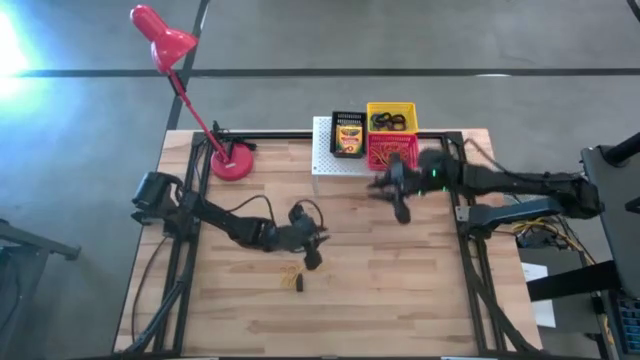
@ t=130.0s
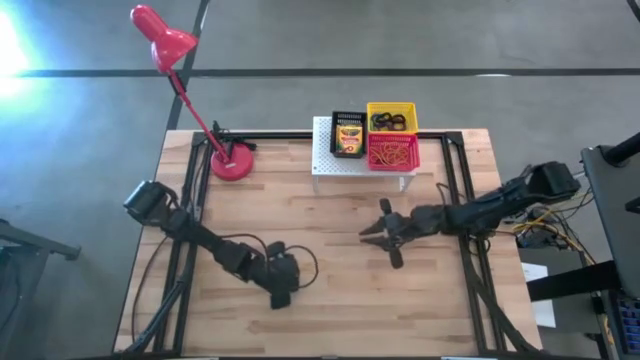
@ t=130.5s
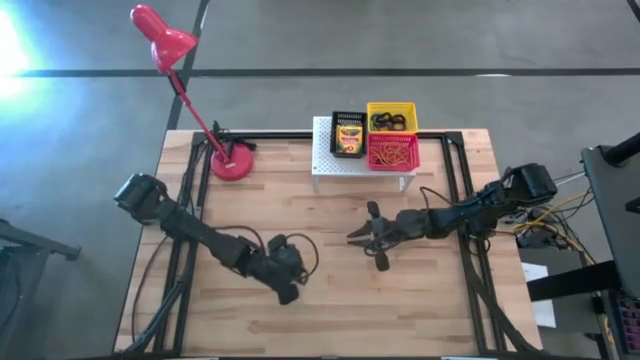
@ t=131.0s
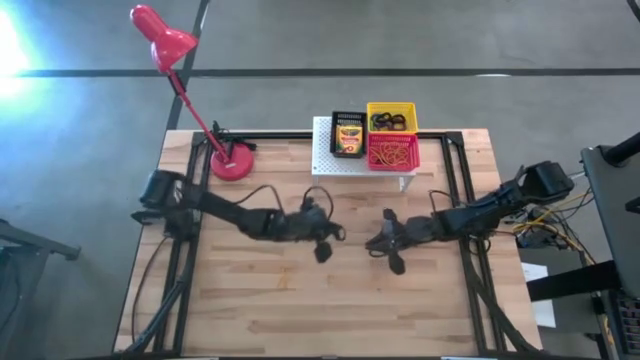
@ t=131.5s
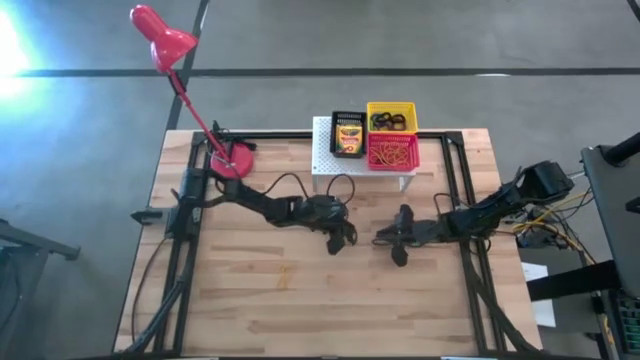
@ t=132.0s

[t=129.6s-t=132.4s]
Task: Pick & Place Office Desk Supplies
Put the black rubber band into the red basket on the shelf

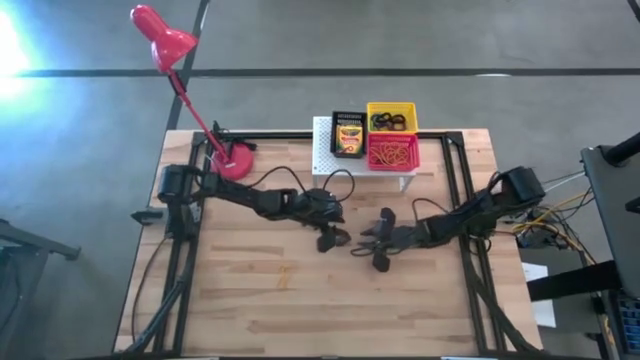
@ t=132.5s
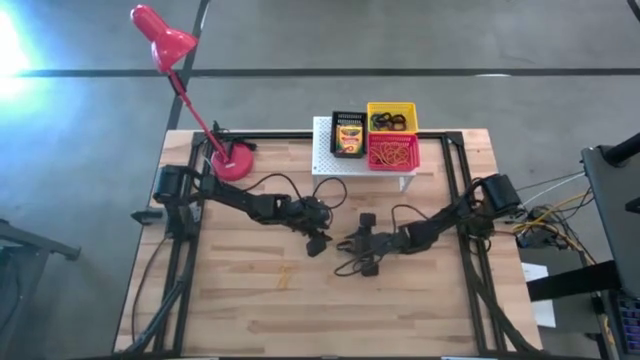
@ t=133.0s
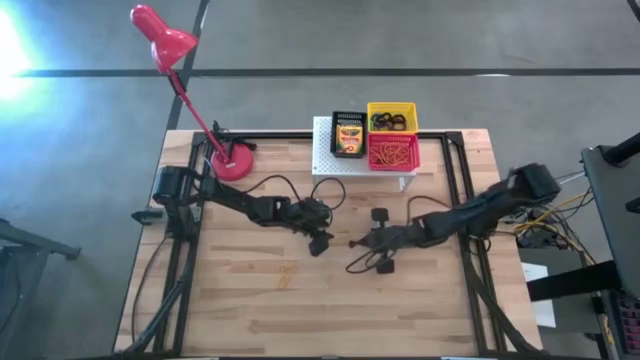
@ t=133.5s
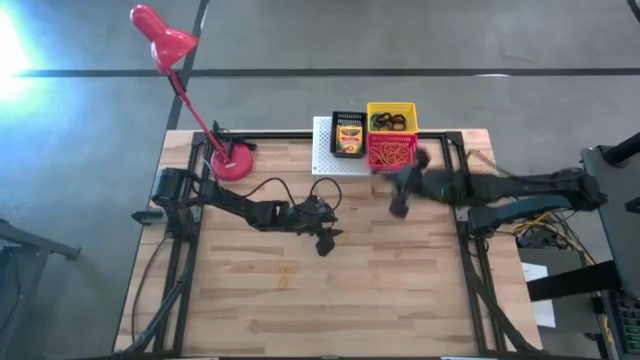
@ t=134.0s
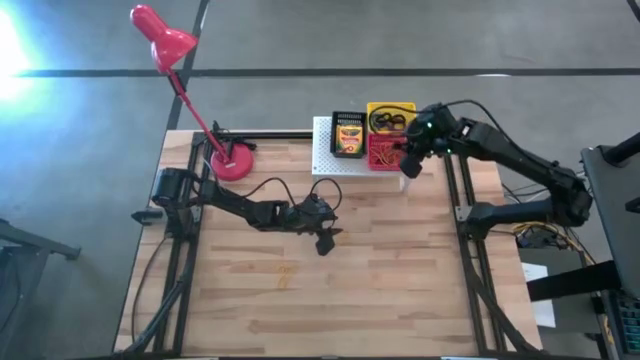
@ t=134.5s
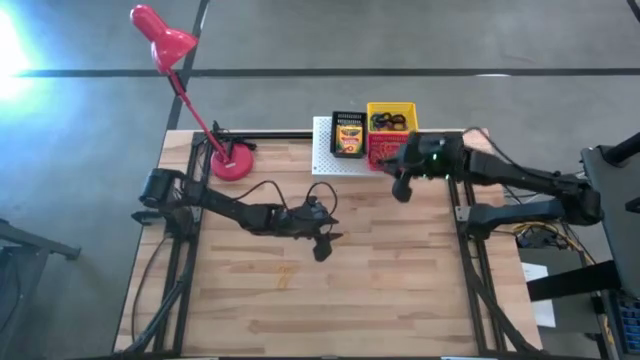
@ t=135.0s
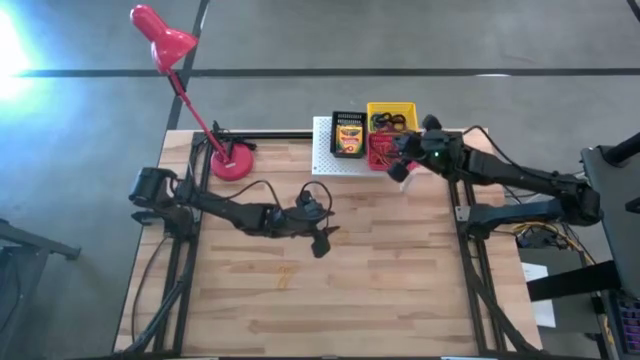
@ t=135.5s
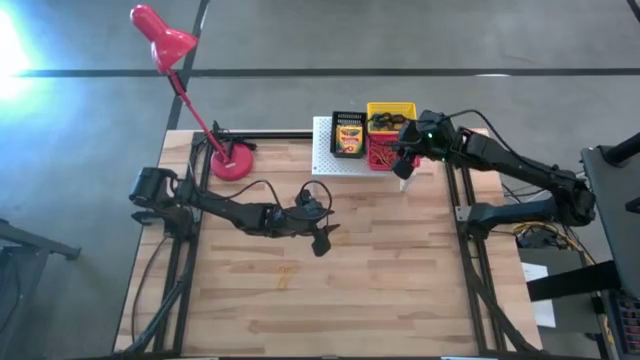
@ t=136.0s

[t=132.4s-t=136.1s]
Put the black rubber band into the red basket on the shelf

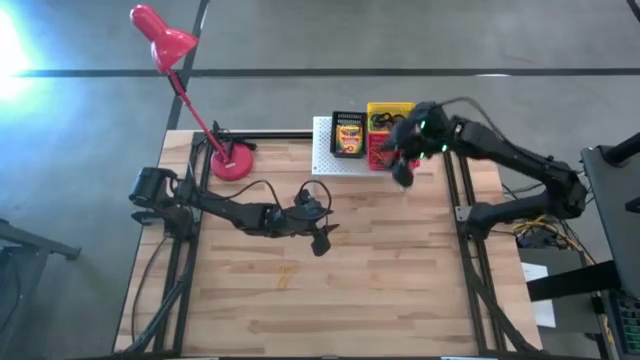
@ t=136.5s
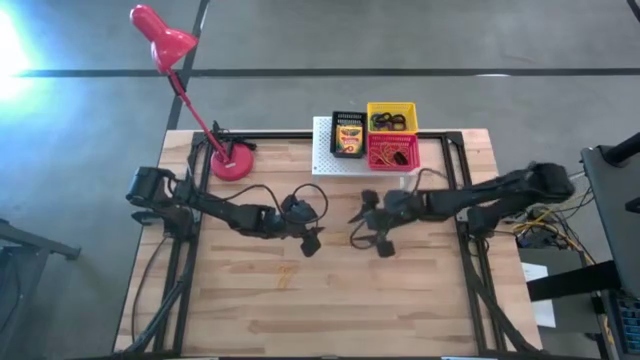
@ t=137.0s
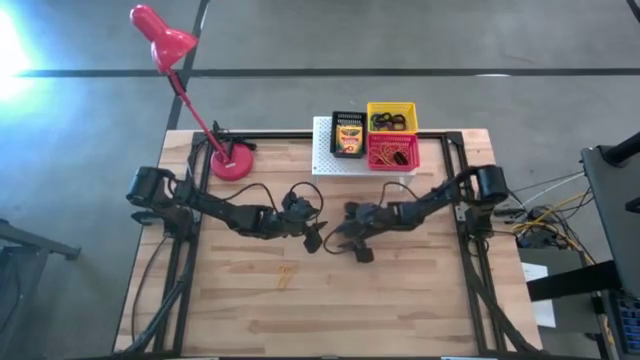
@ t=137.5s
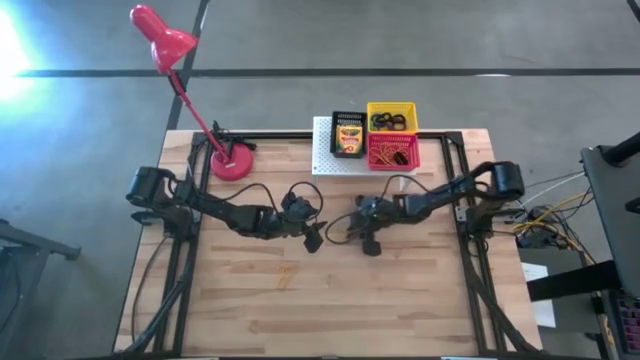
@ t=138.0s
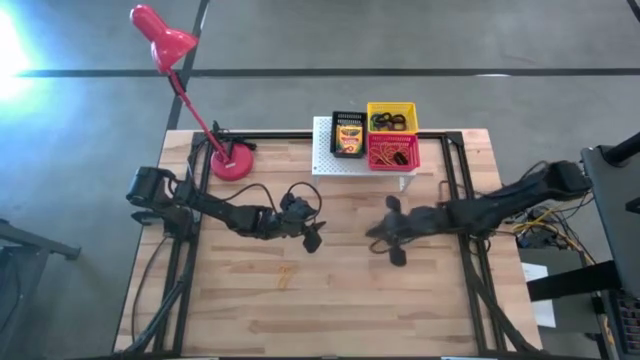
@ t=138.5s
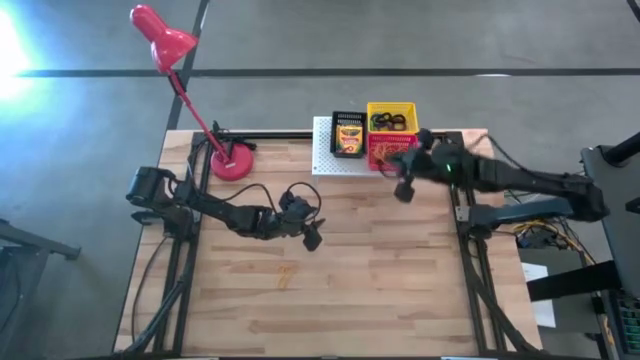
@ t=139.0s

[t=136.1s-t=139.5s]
Put the yellow rubber band into the red basket on the shelf

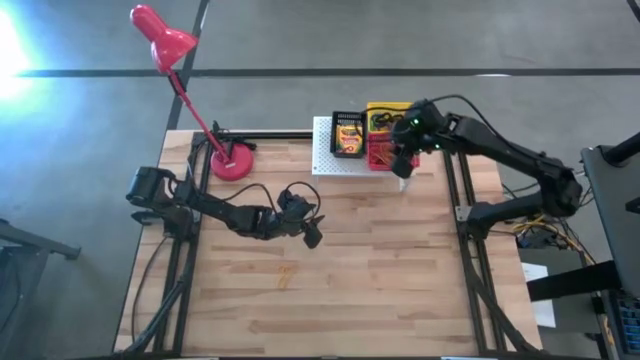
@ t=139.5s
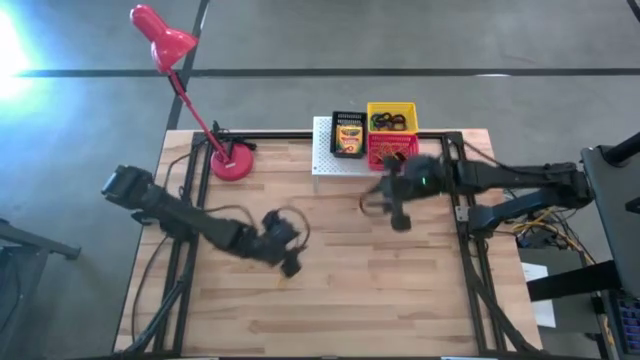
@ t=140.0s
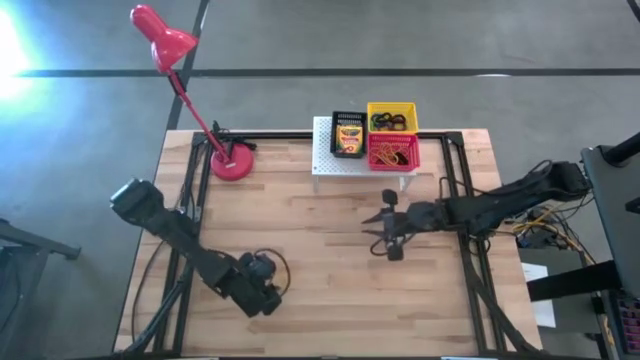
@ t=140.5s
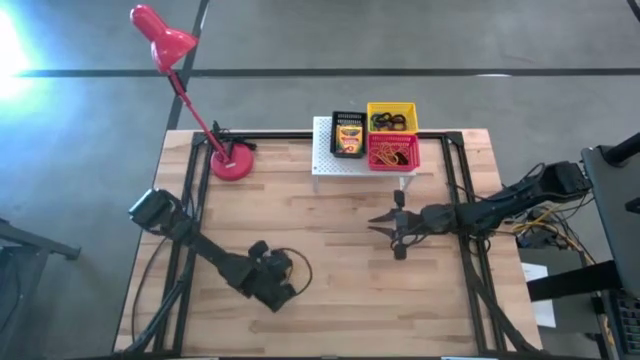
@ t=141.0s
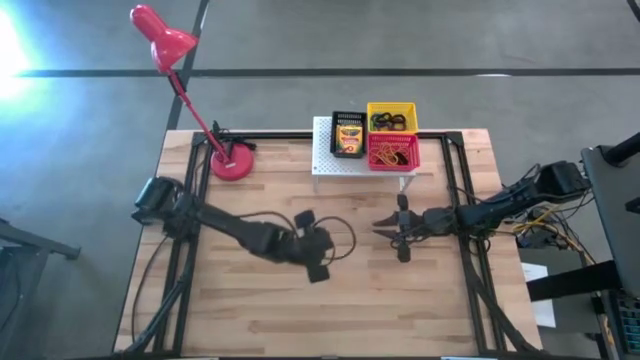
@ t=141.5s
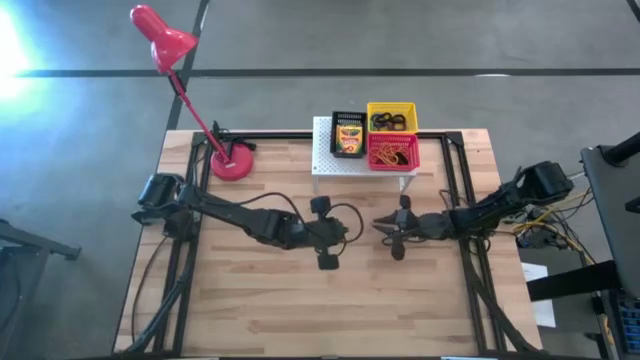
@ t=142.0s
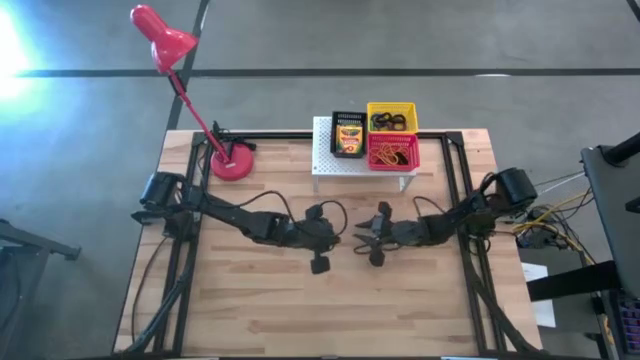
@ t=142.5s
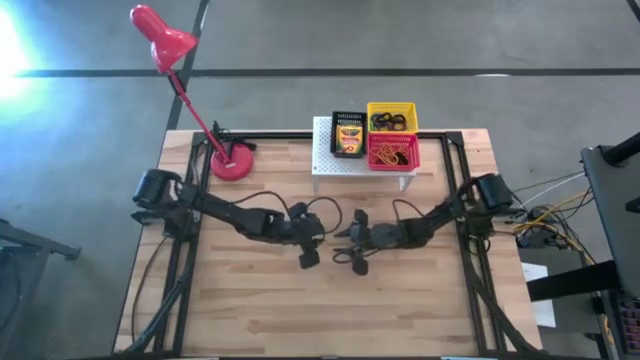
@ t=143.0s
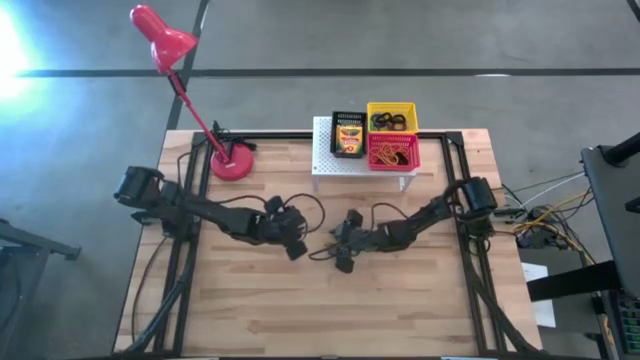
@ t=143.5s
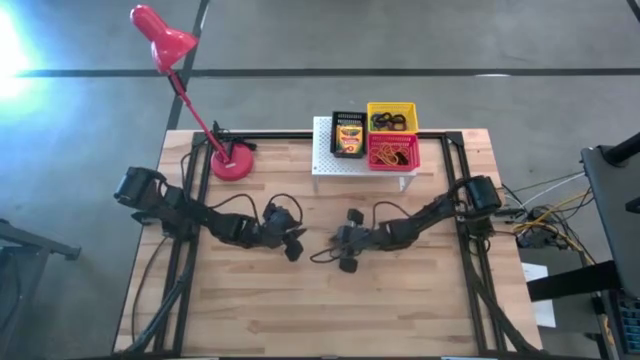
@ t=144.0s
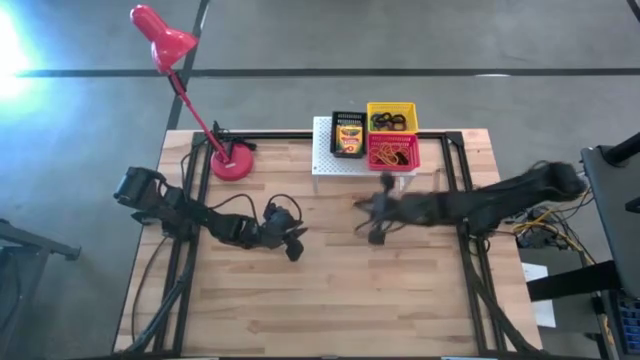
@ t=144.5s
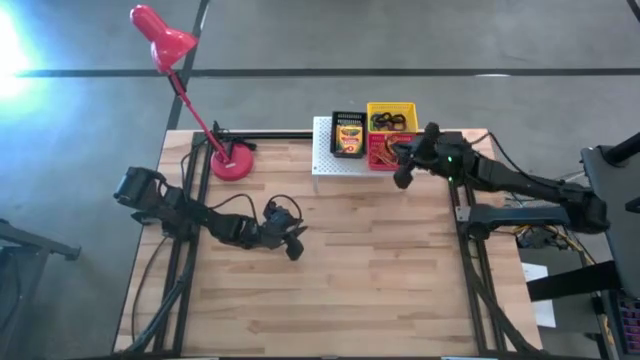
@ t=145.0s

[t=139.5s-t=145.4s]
Put the yellow rubber band into the red basket on the shelf

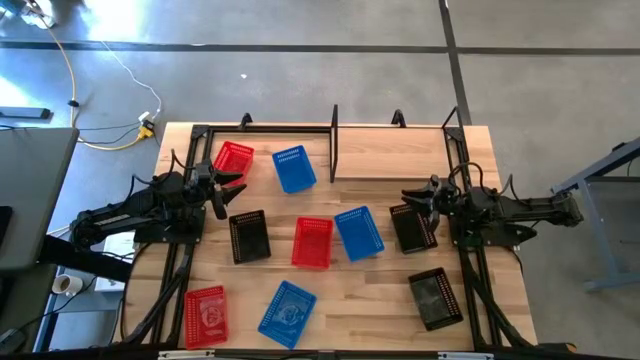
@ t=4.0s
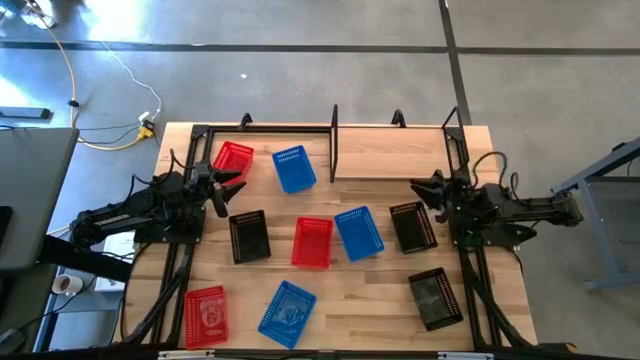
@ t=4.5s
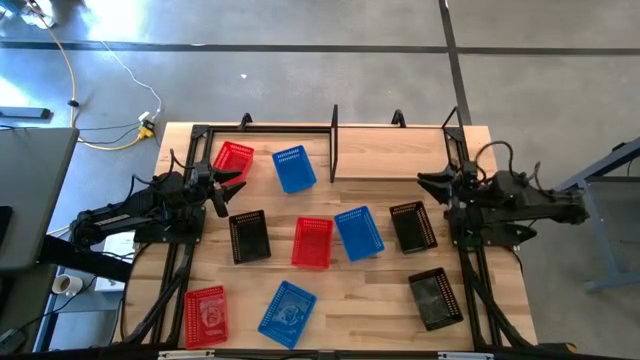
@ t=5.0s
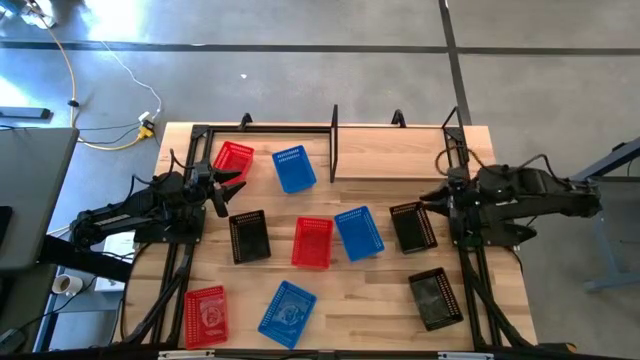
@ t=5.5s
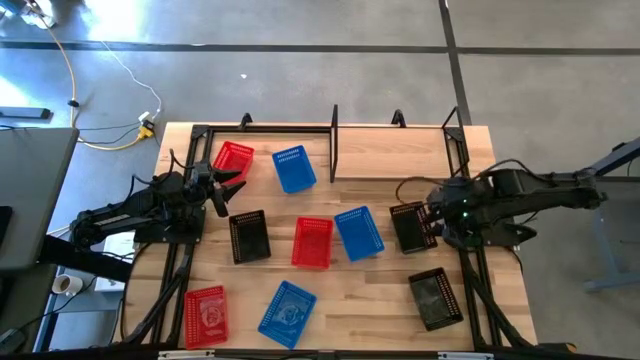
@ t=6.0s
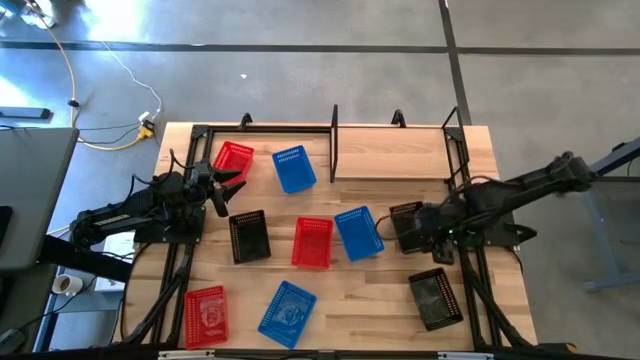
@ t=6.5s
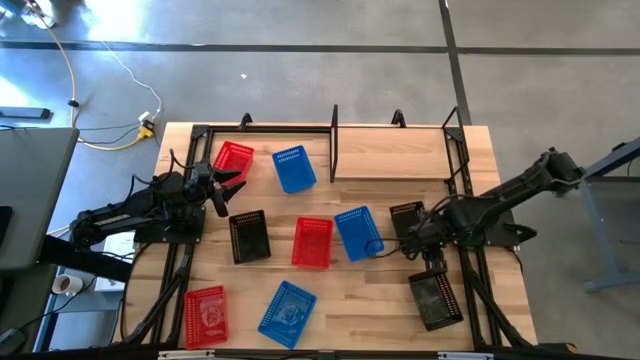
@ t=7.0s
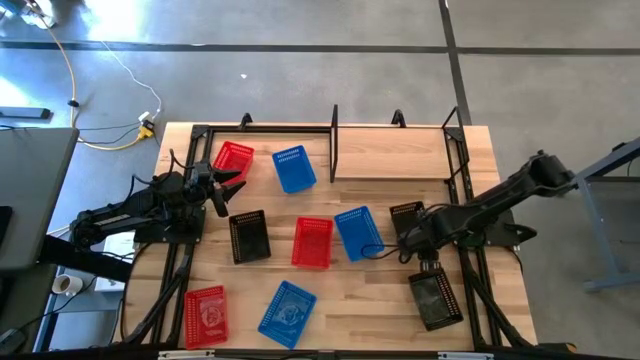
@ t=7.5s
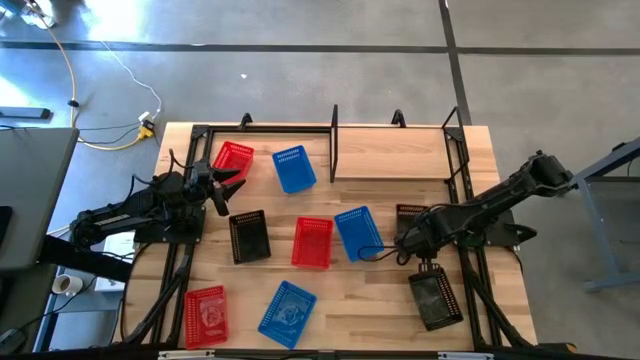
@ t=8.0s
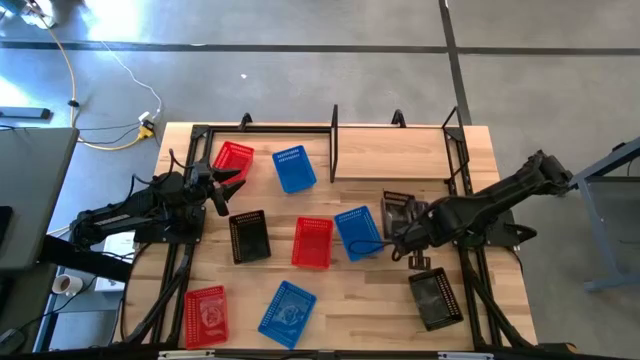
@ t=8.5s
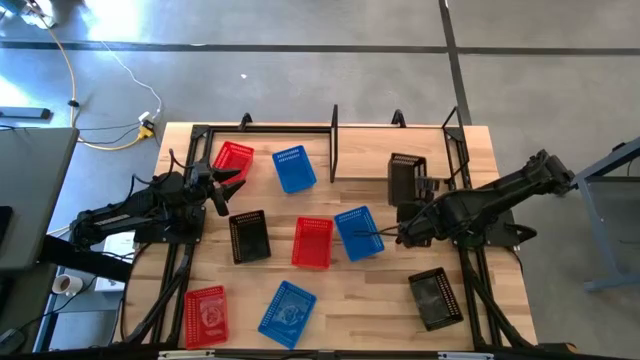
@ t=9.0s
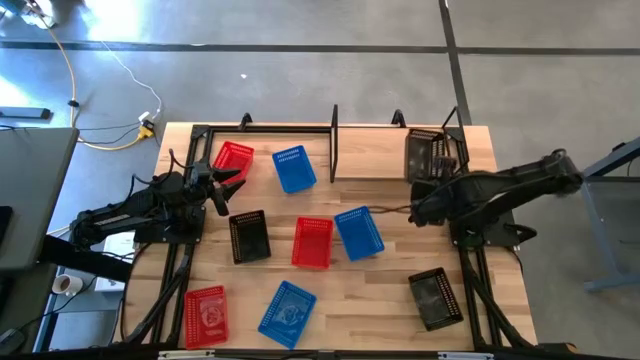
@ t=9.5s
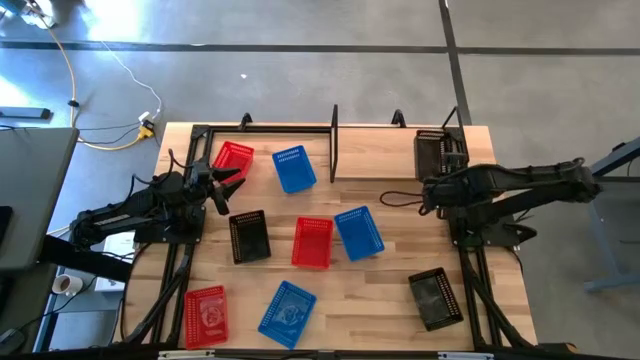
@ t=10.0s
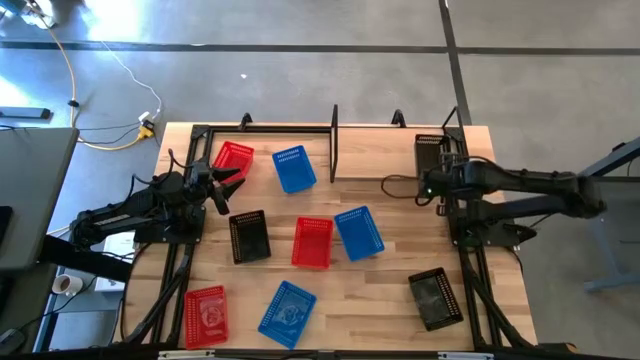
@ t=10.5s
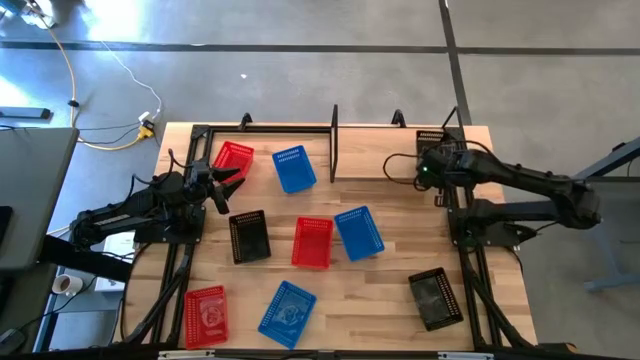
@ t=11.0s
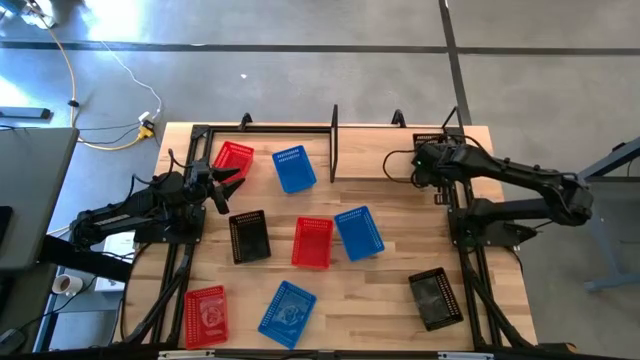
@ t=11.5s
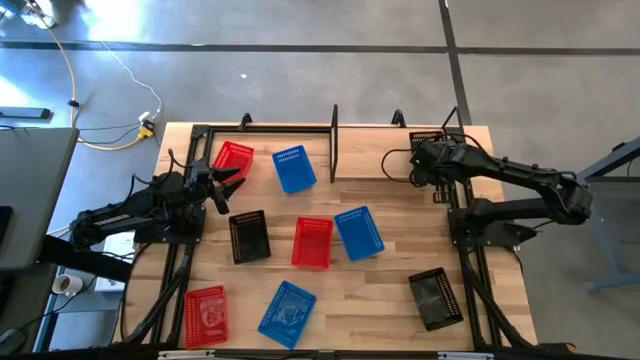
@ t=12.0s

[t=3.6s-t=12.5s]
Task: Stack baskets on shelf by color
Put the top right black basket on the shelf
